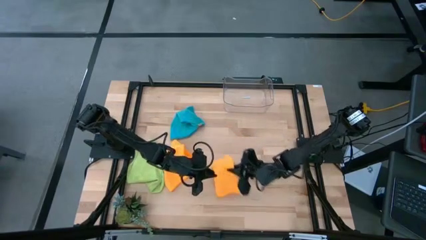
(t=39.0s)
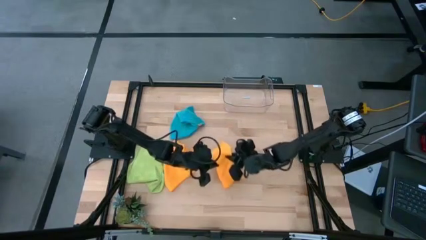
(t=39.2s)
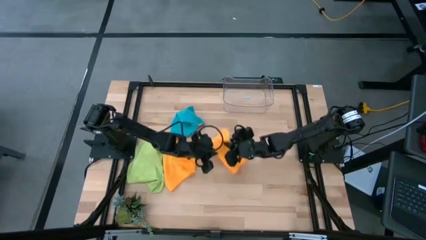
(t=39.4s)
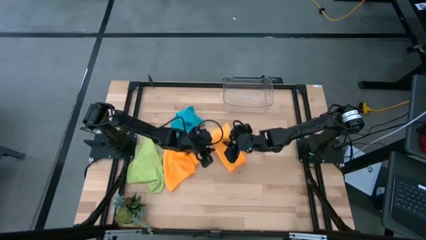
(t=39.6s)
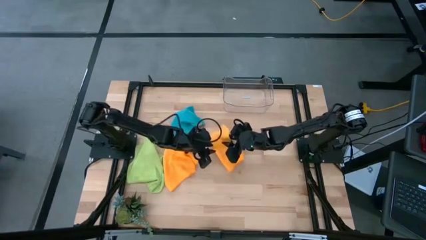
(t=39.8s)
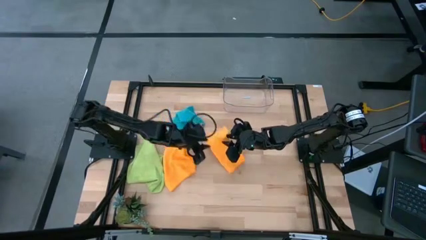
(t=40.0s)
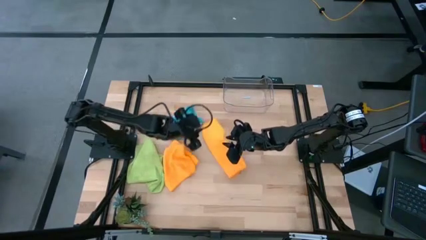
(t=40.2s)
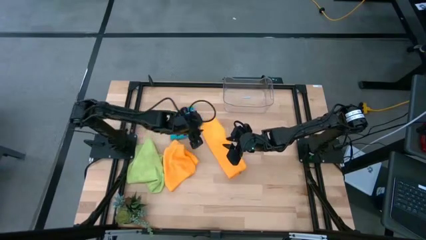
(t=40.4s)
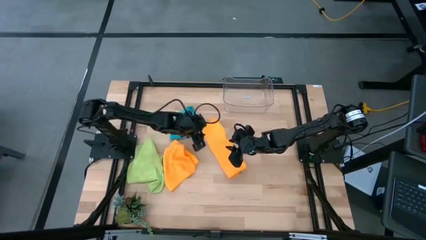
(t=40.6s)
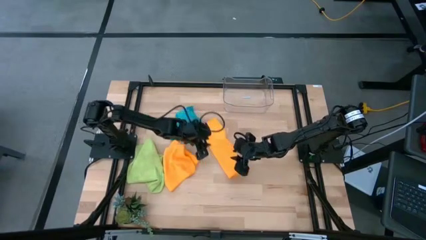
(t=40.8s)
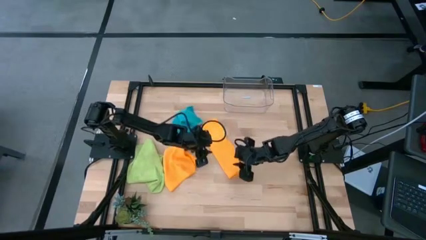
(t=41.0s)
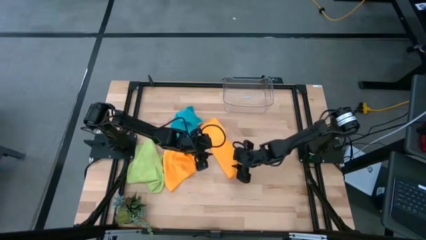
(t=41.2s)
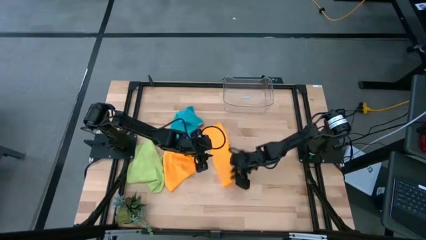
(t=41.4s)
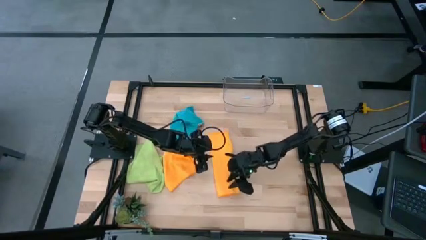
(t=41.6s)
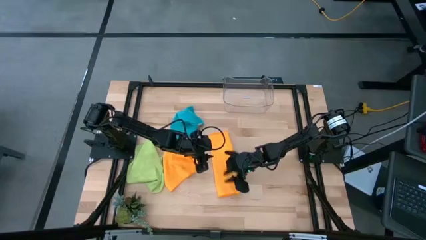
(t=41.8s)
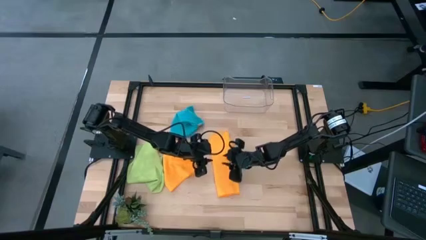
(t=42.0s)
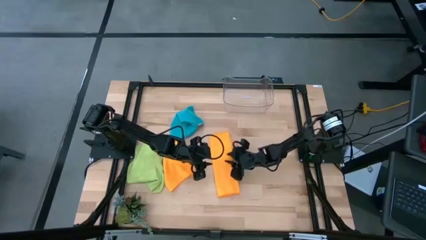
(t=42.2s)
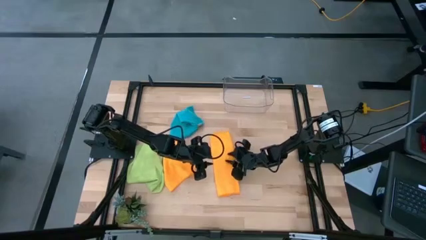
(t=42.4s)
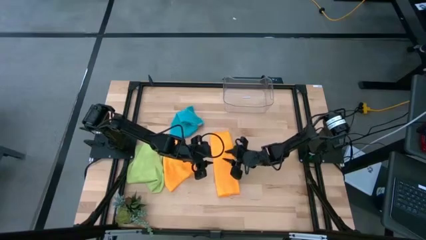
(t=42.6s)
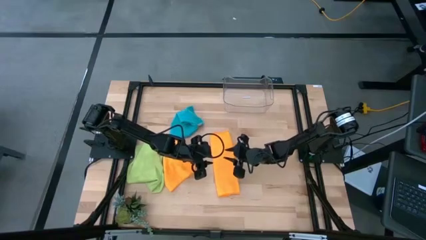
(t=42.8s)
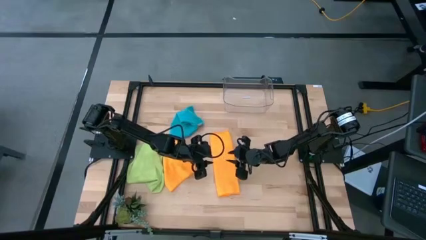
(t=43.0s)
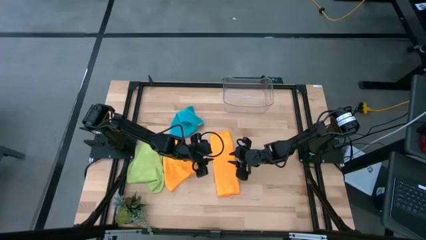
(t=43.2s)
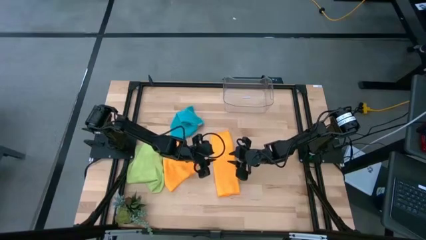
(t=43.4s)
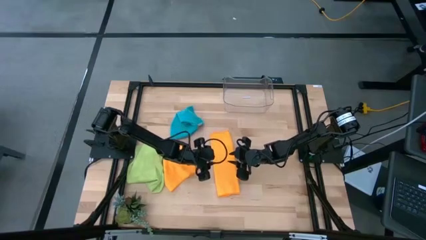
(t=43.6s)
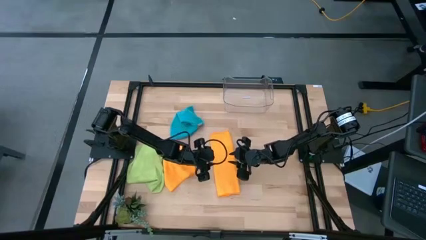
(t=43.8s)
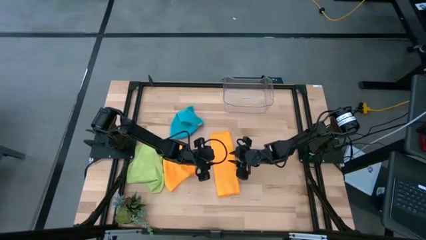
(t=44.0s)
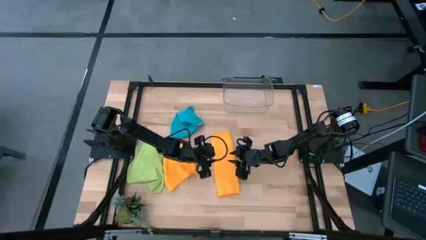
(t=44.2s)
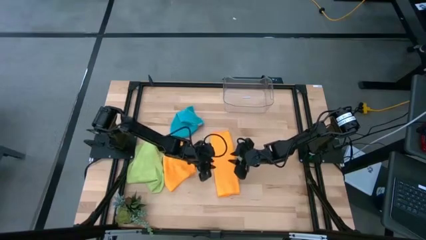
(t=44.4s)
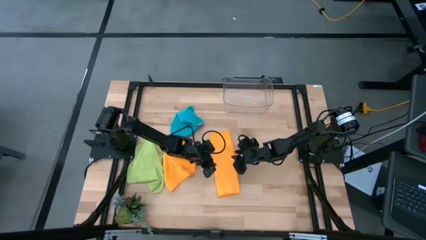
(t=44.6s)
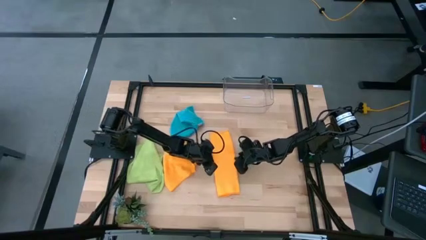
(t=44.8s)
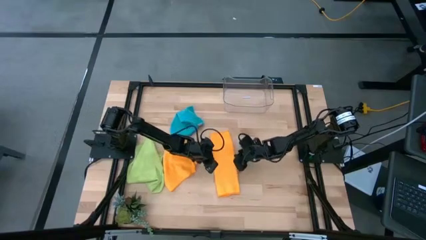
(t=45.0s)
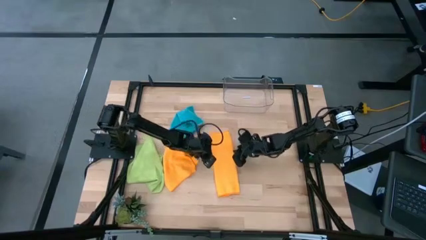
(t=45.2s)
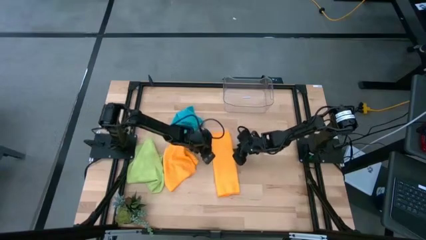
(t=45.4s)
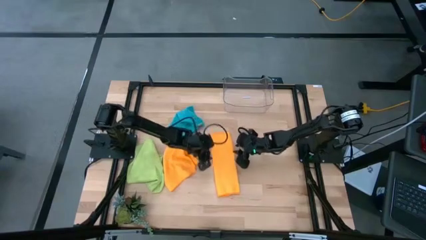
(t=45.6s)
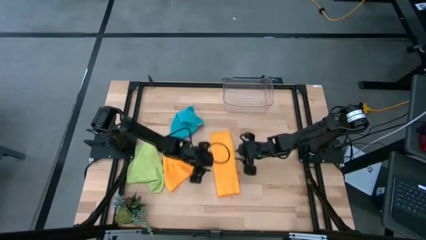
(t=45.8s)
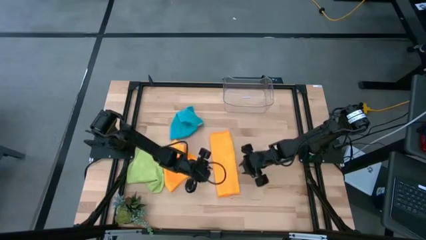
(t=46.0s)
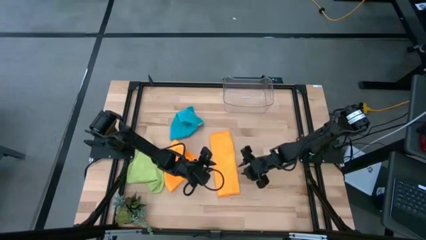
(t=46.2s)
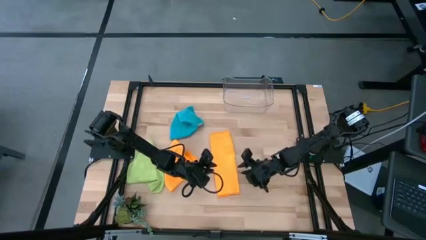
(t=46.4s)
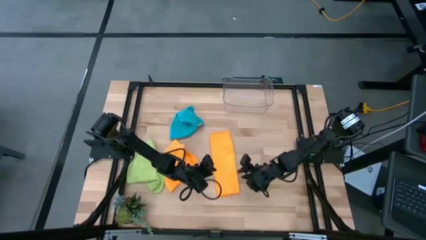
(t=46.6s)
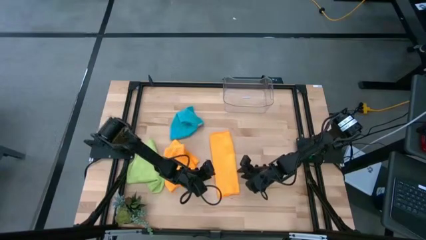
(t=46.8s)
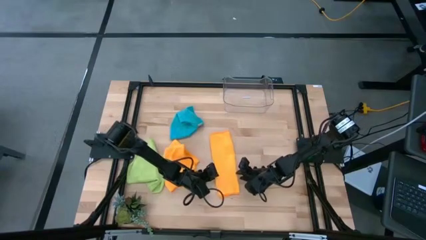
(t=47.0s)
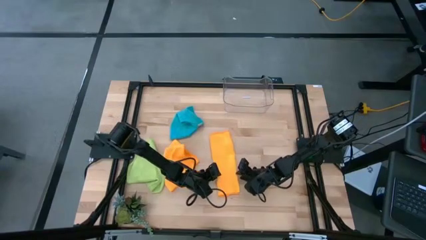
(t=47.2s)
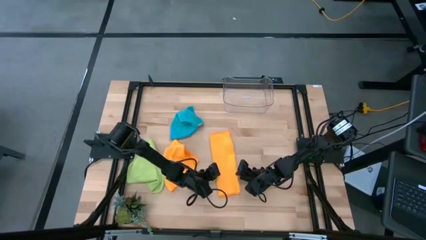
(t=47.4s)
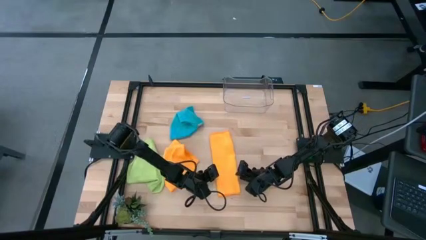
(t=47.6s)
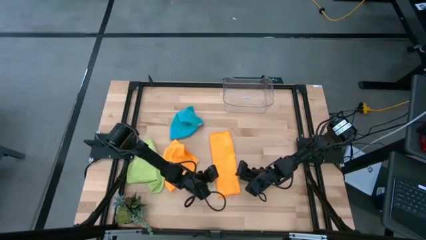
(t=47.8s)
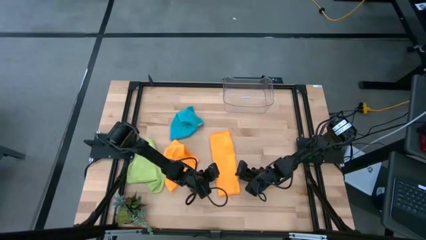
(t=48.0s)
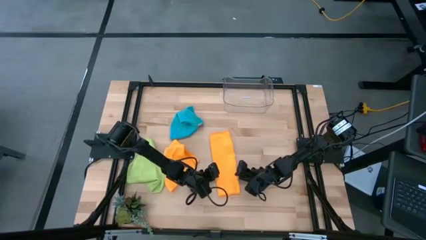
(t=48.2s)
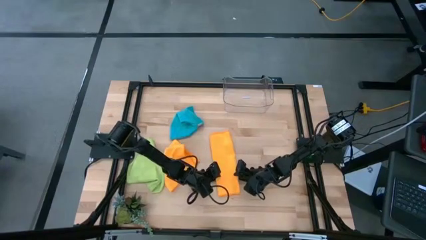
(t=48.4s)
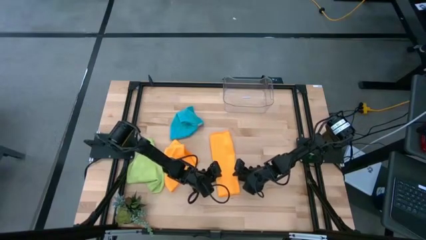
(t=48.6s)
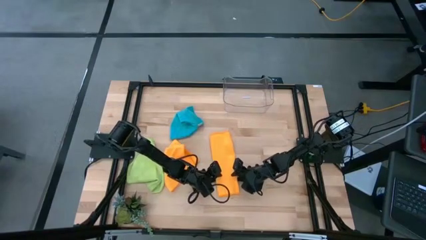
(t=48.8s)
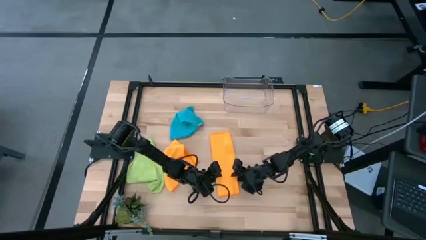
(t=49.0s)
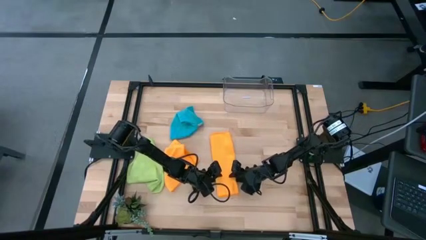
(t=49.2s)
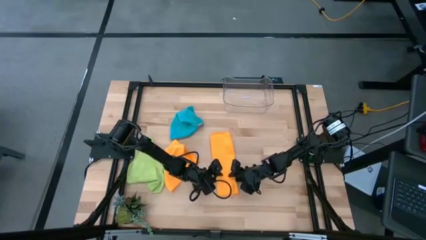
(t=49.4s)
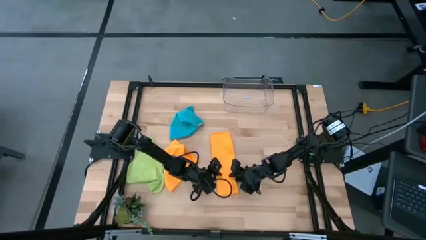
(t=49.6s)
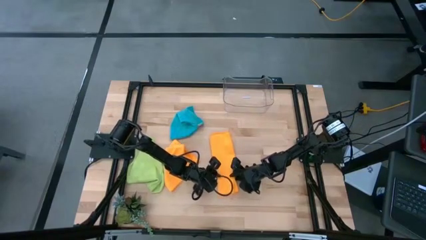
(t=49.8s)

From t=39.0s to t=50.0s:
Task: Fold microfiber towels
Fold the right orange microfiber towel
